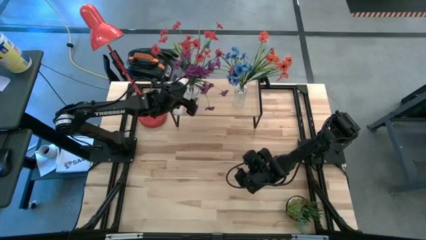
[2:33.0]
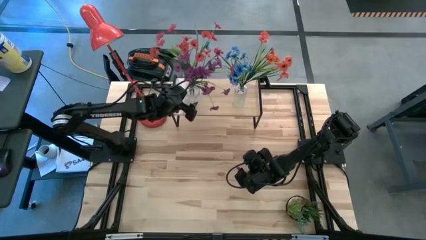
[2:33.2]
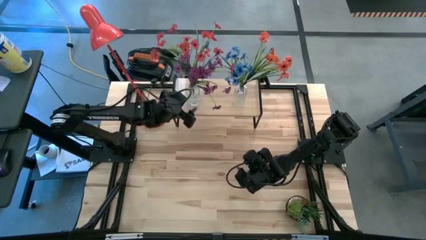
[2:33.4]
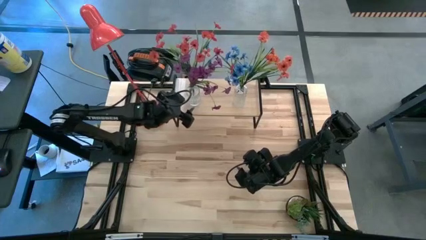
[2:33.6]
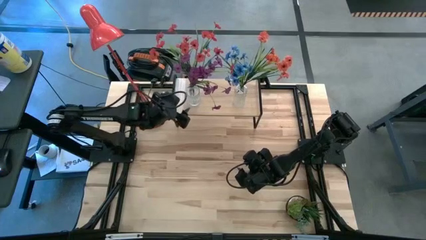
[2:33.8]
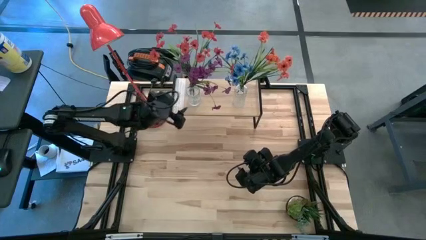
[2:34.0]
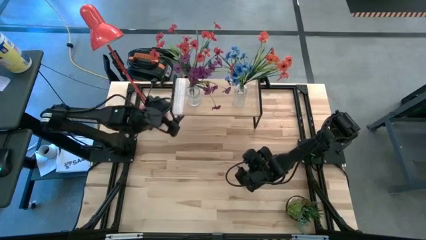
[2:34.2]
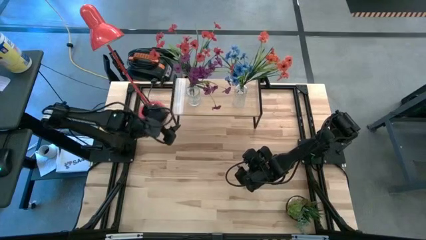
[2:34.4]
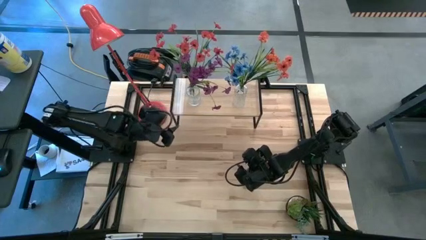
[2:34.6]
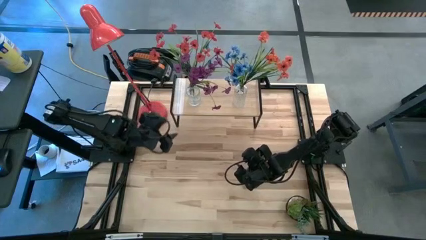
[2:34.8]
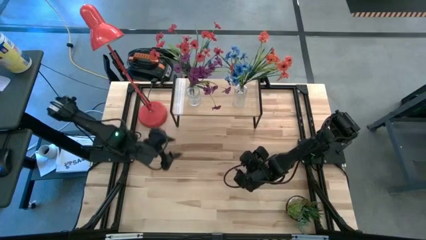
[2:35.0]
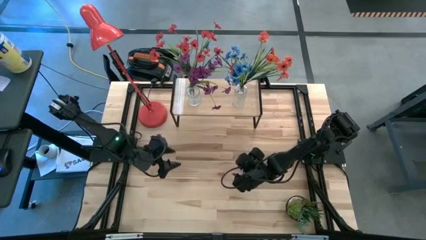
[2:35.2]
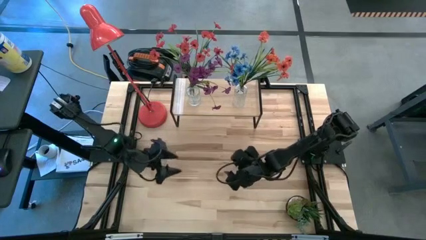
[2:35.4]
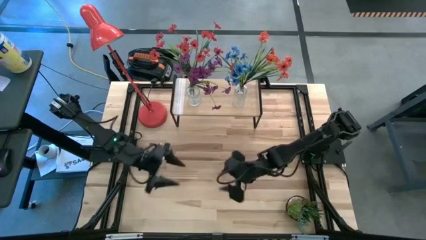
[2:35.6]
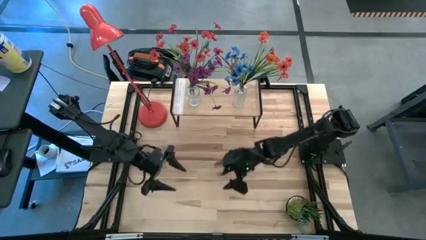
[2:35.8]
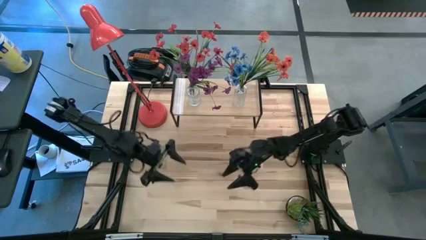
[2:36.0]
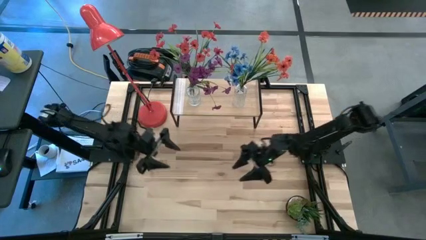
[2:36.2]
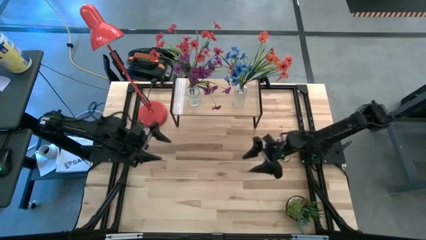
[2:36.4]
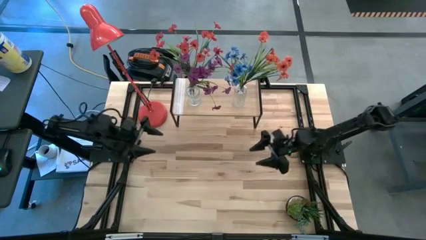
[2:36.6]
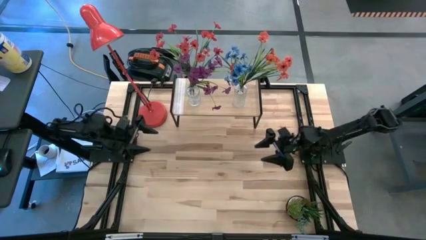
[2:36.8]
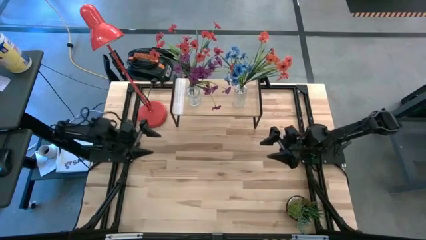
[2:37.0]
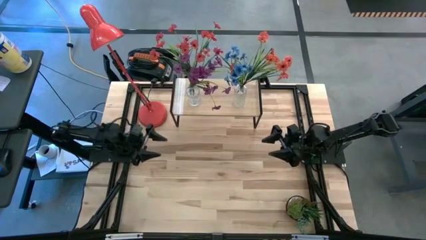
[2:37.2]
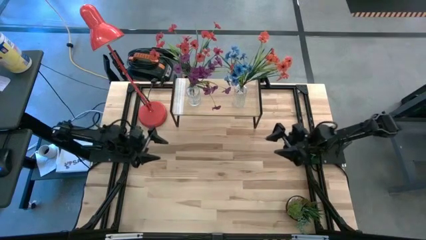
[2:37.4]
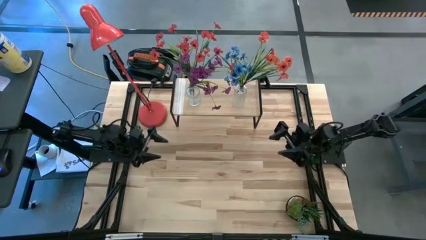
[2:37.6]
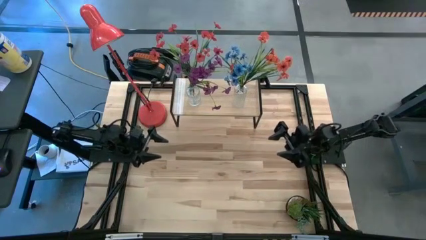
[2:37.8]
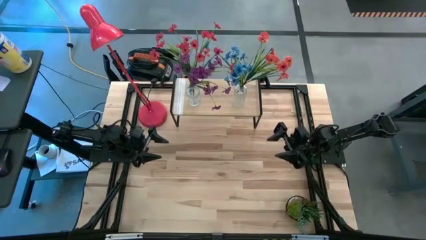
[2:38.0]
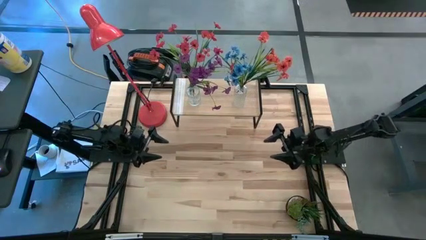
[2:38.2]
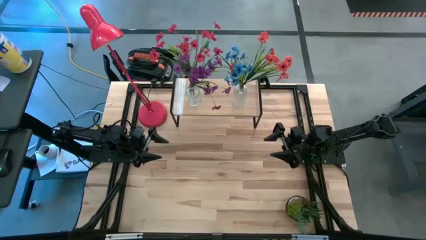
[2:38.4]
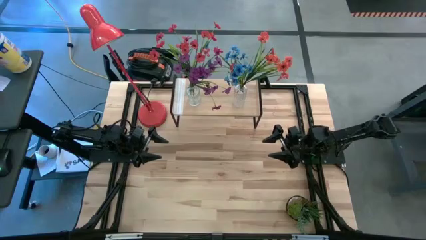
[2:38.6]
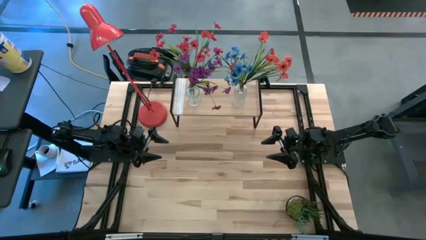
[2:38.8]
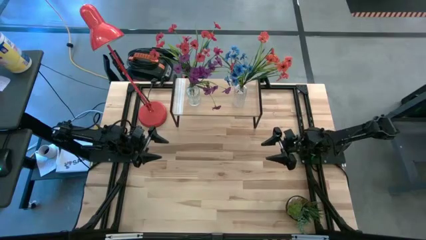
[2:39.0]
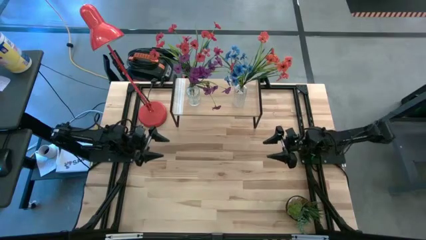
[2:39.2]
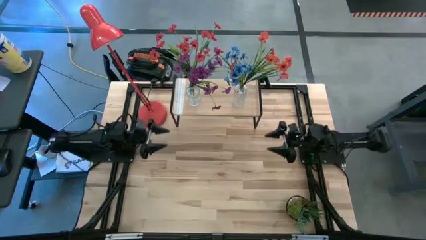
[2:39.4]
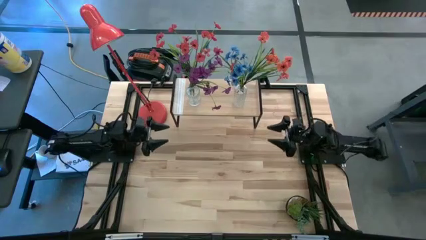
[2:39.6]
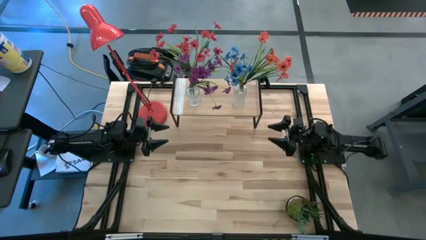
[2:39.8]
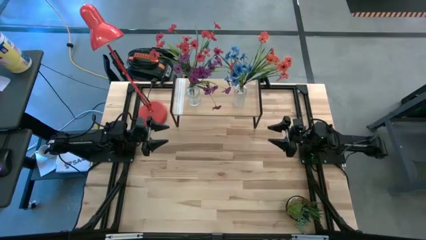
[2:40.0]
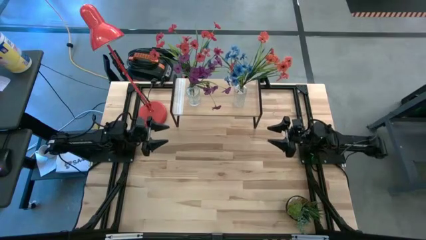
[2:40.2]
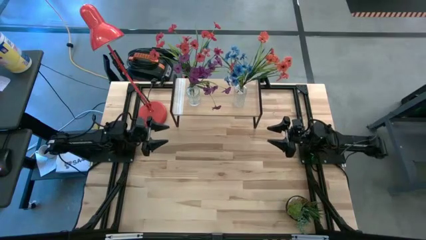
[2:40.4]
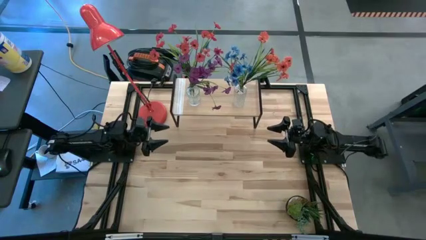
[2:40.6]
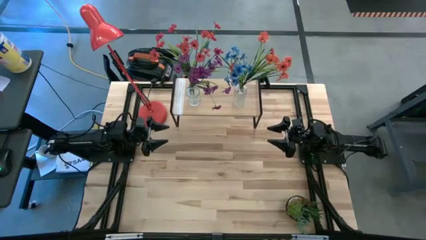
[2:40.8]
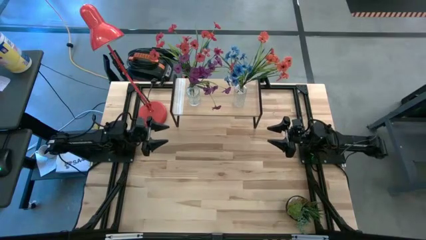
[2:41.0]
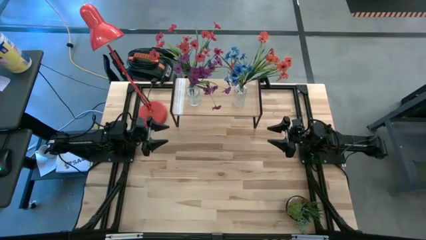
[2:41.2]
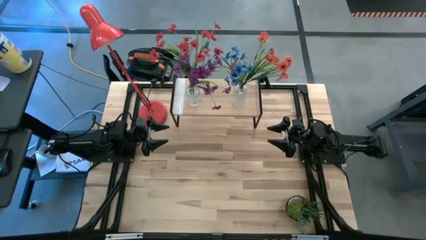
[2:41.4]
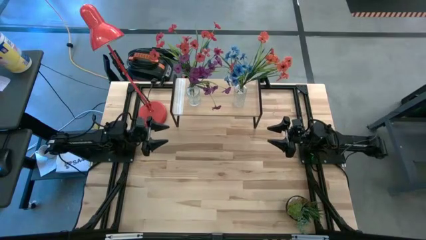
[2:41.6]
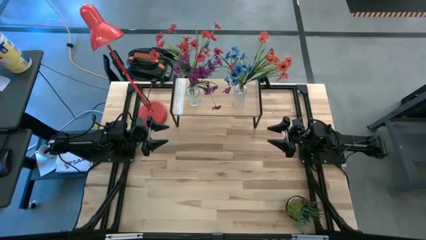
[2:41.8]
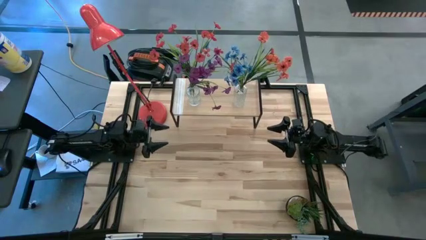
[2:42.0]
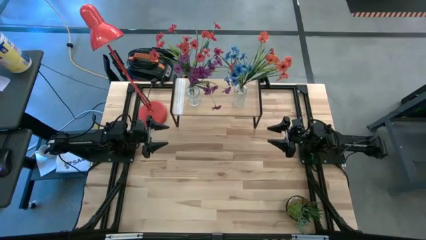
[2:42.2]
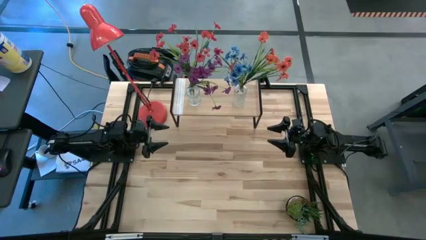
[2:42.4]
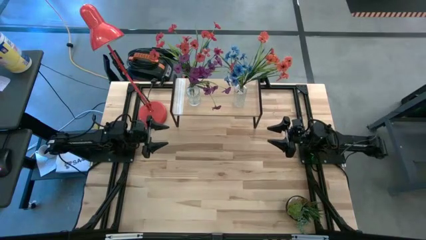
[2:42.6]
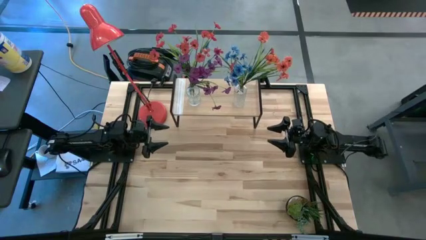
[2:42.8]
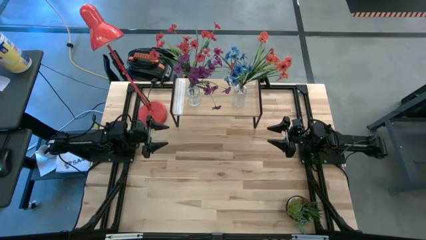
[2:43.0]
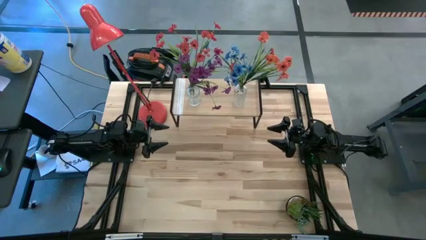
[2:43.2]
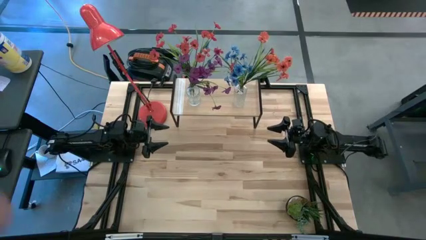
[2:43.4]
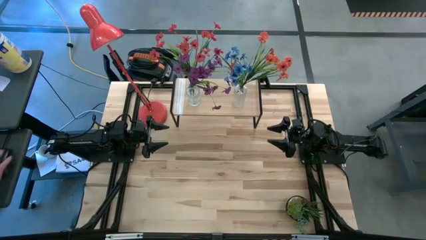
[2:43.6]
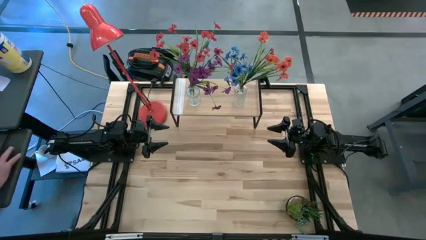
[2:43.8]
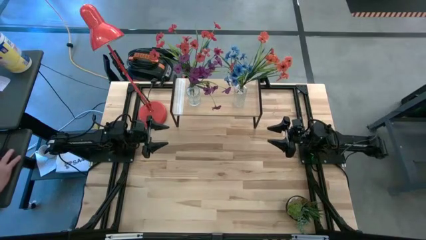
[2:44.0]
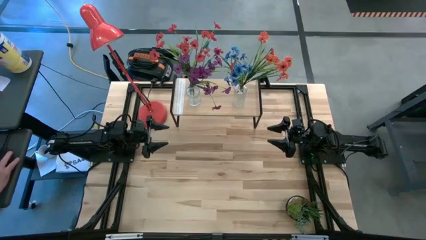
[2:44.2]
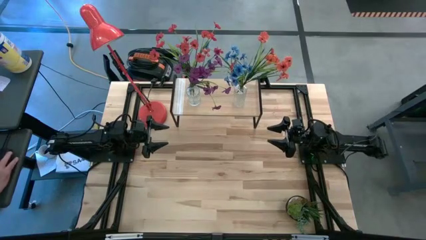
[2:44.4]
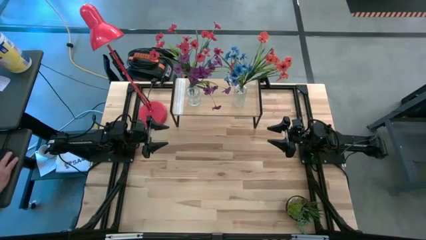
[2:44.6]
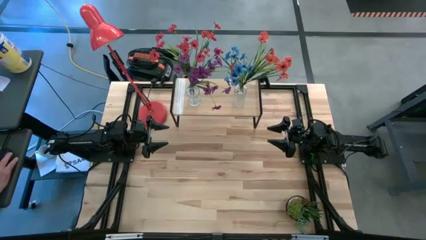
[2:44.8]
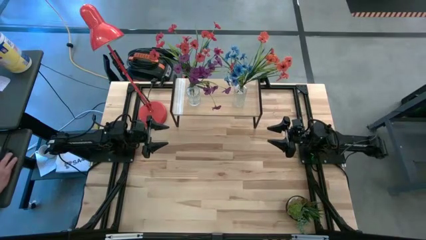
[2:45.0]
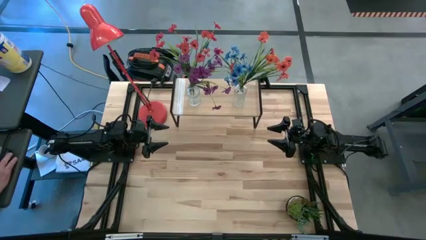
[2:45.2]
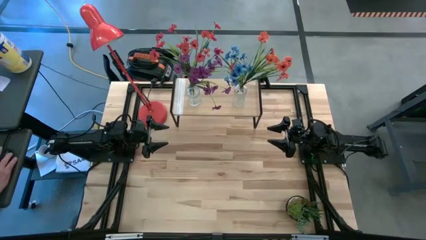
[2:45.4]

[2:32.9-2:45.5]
Task: Pick and place flowers into a vace then onto a shelf
Return to Home Position

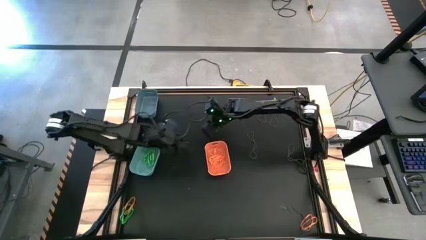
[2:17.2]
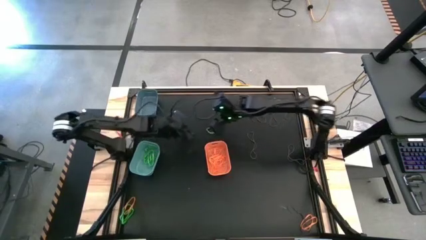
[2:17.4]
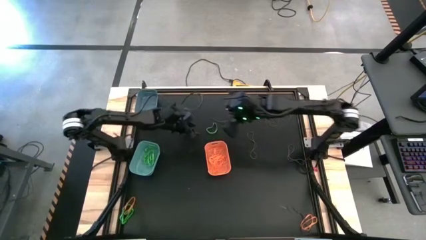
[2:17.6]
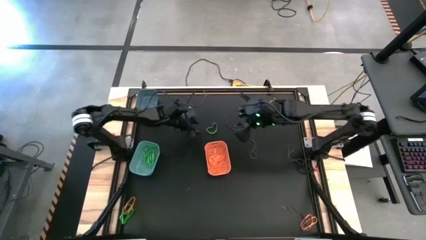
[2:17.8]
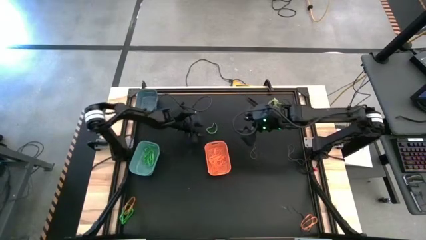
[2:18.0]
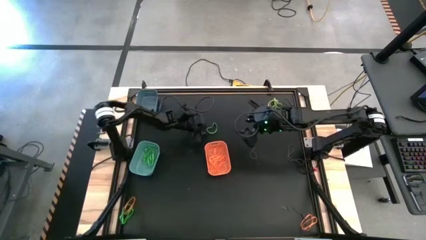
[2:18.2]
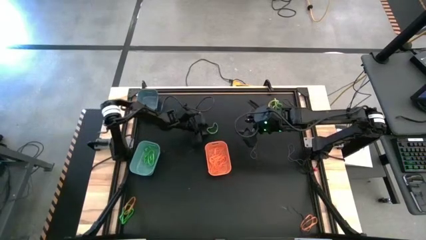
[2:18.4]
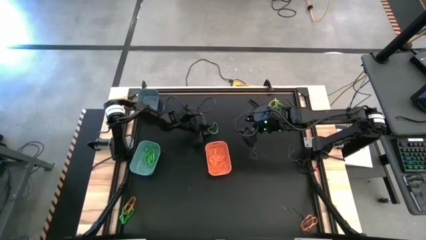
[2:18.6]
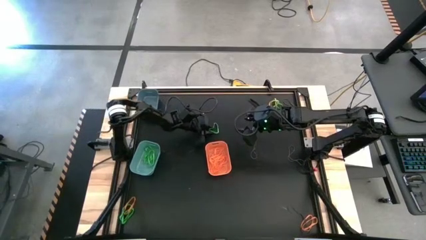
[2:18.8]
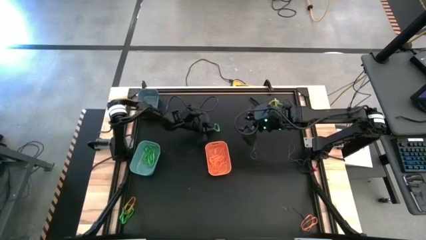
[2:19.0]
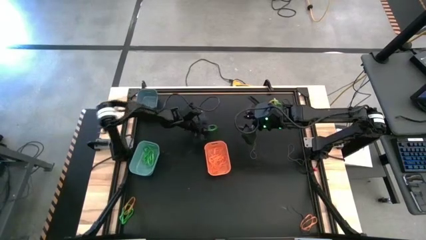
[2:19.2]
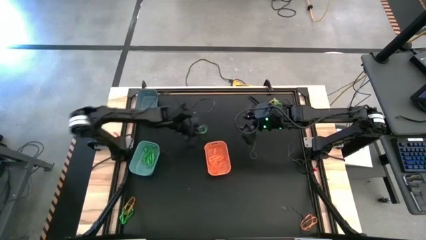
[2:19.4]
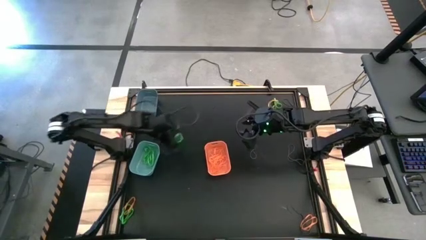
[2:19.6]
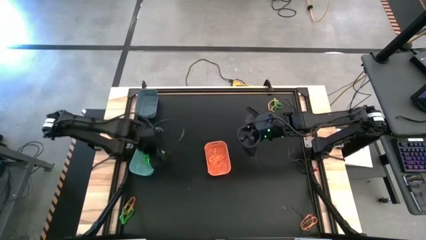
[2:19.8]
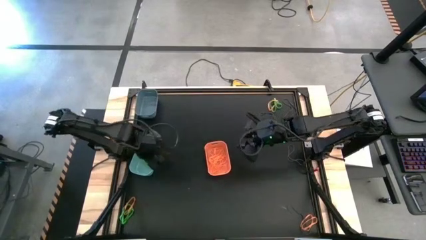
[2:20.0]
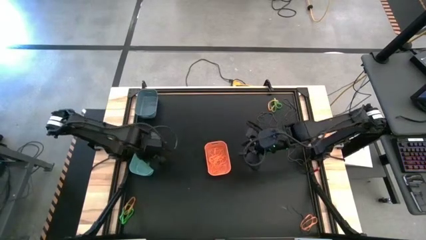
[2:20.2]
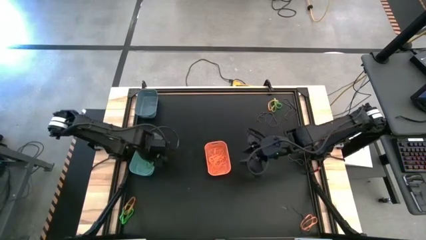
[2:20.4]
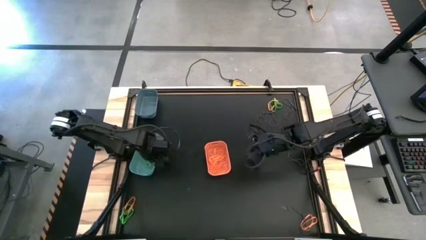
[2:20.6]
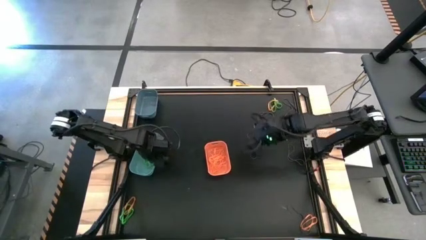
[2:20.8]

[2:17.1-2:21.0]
Task: Sort rubber bands into baskets
Put the green rubber band into the light sea green bin

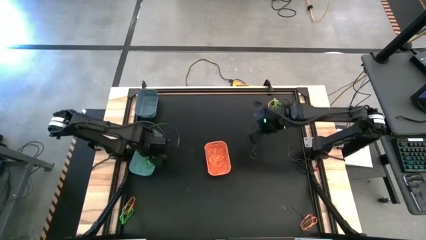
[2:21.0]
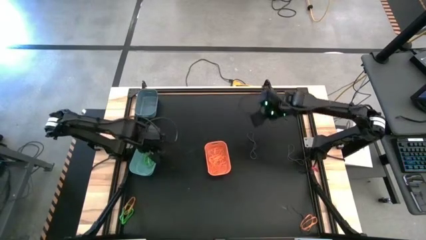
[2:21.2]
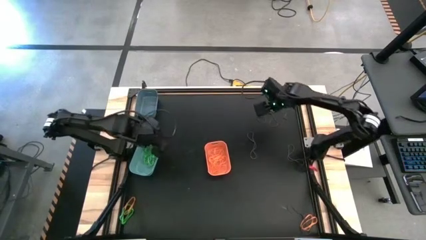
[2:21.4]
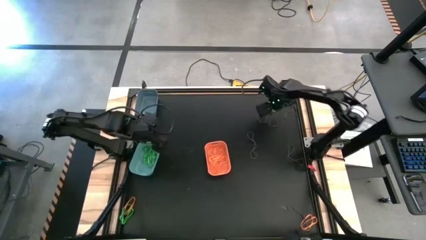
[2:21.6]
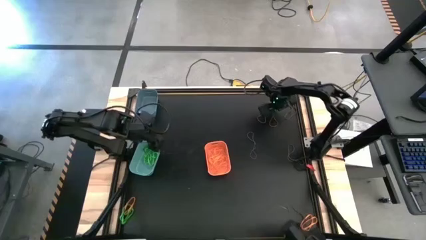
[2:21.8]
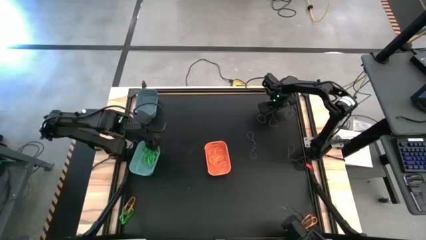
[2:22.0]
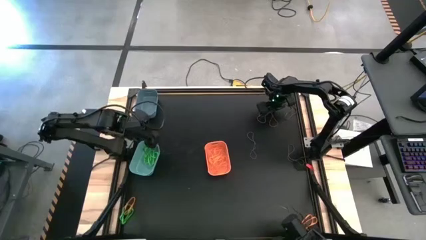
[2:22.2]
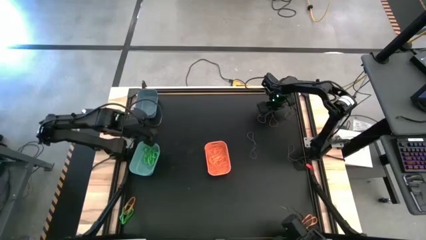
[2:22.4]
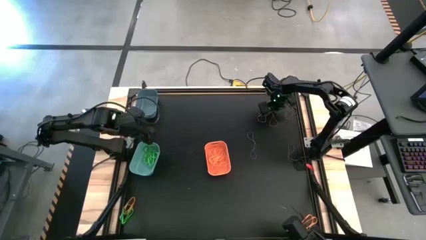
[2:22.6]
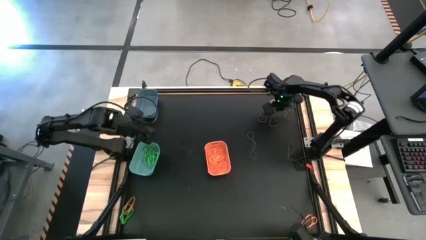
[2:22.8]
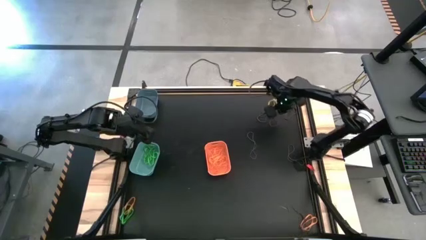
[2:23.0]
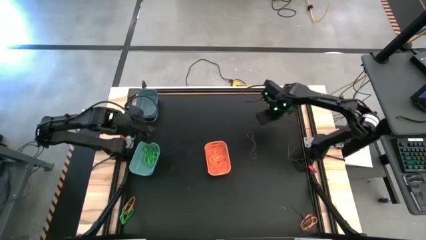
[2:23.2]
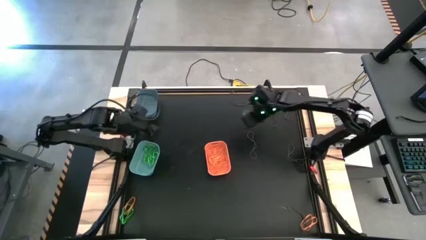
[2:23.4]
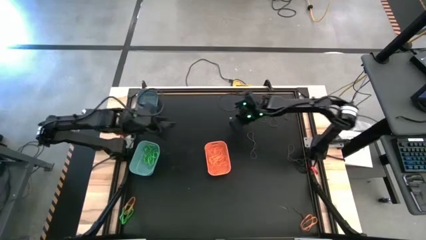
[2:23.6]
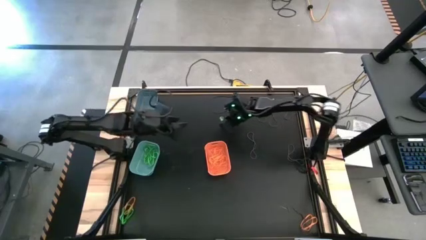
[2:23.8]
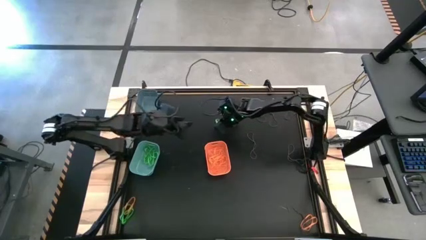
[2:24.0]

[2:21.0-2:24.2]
Move the green rubber band
